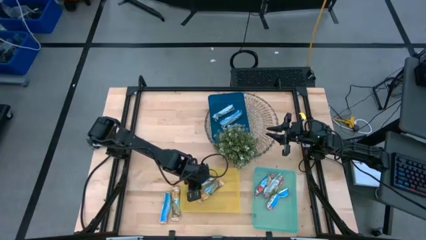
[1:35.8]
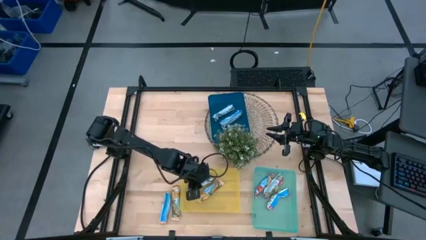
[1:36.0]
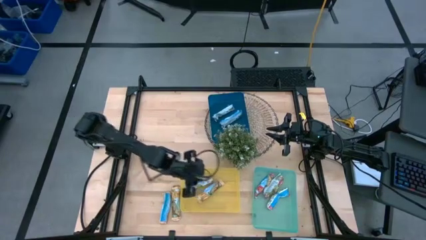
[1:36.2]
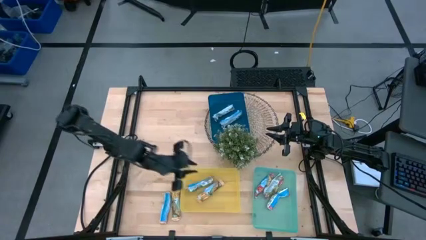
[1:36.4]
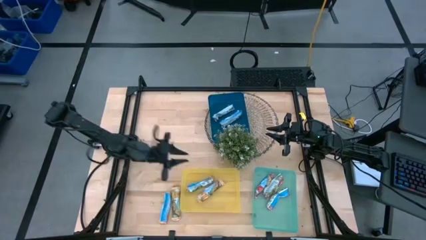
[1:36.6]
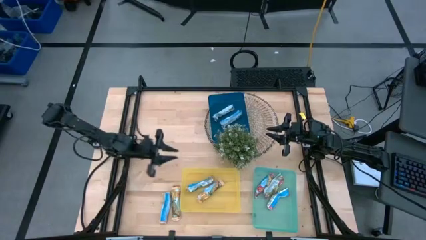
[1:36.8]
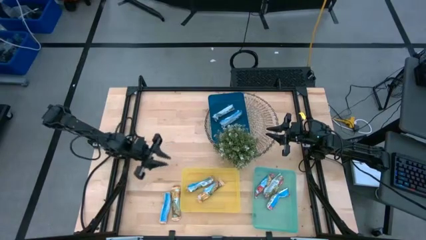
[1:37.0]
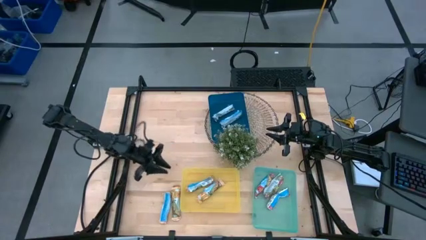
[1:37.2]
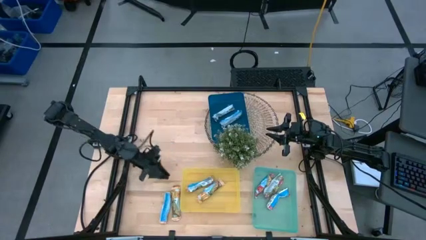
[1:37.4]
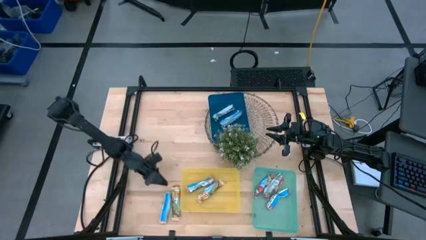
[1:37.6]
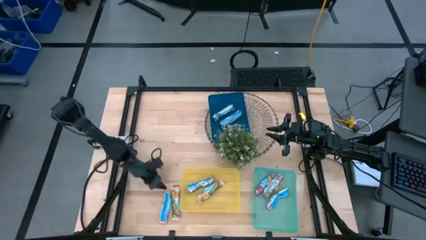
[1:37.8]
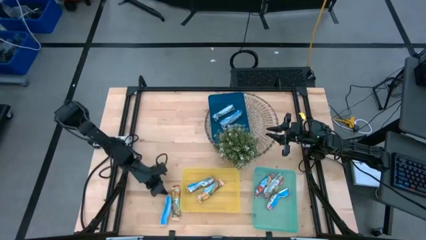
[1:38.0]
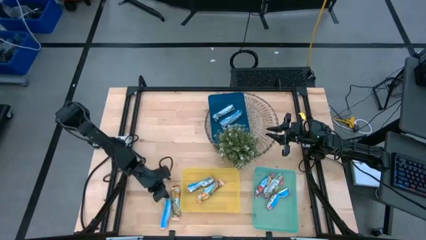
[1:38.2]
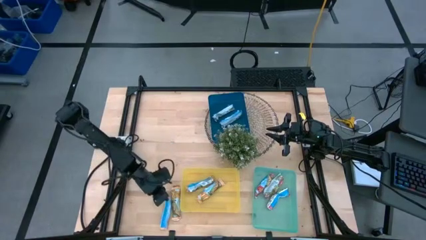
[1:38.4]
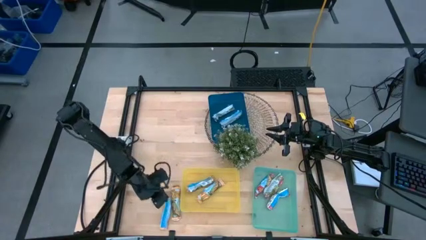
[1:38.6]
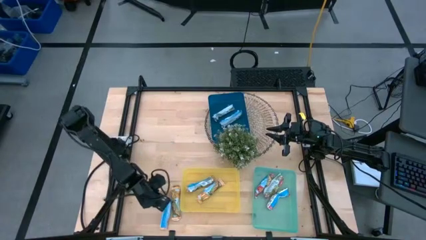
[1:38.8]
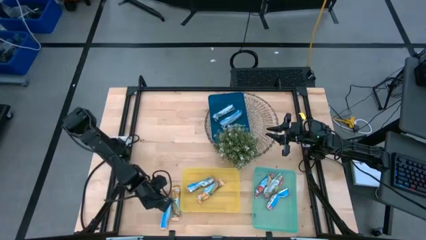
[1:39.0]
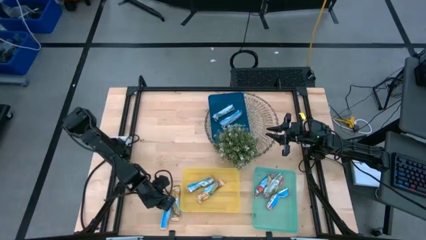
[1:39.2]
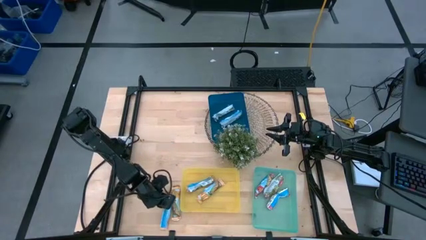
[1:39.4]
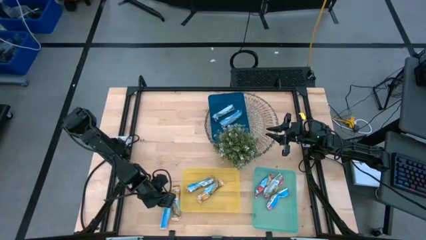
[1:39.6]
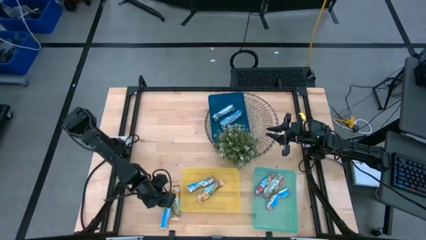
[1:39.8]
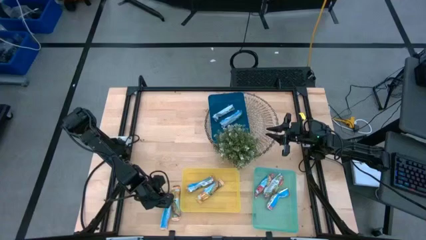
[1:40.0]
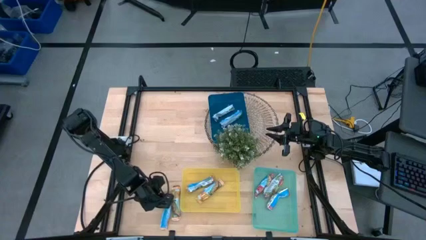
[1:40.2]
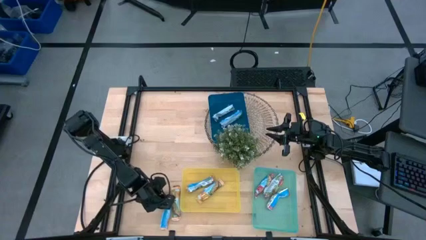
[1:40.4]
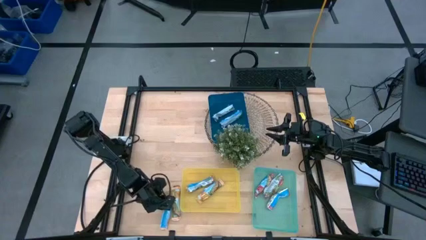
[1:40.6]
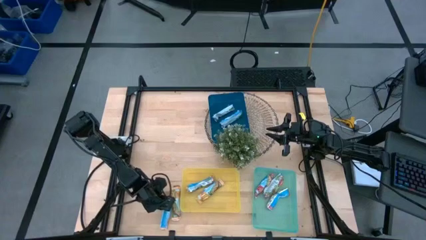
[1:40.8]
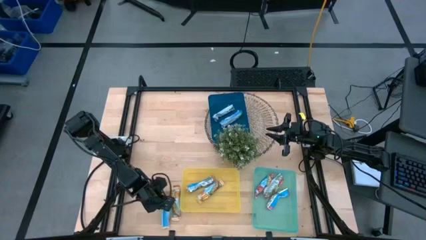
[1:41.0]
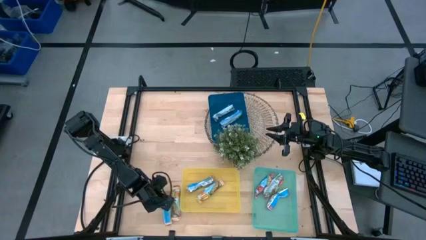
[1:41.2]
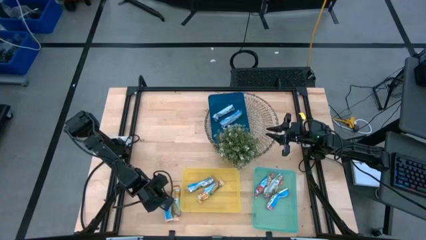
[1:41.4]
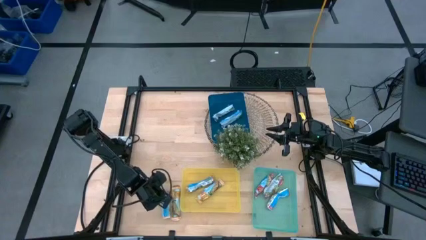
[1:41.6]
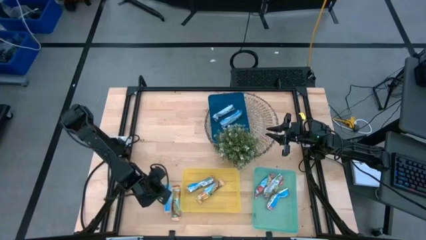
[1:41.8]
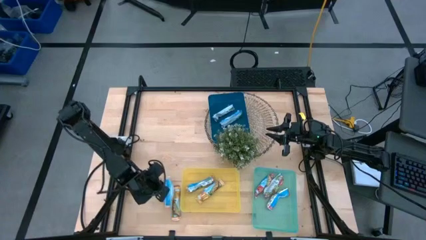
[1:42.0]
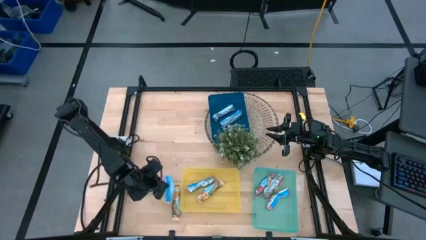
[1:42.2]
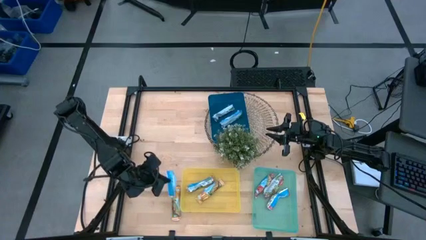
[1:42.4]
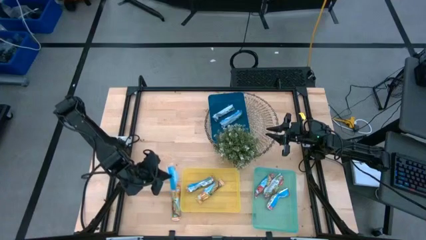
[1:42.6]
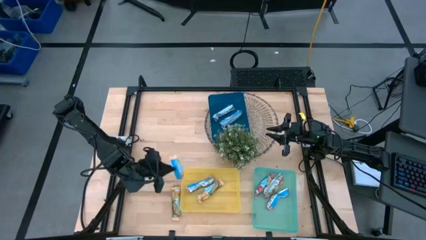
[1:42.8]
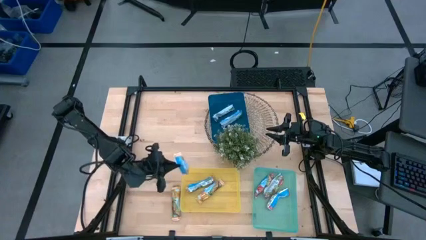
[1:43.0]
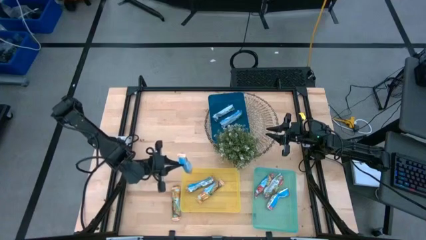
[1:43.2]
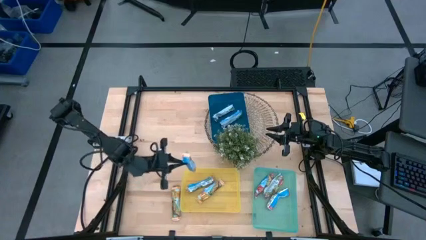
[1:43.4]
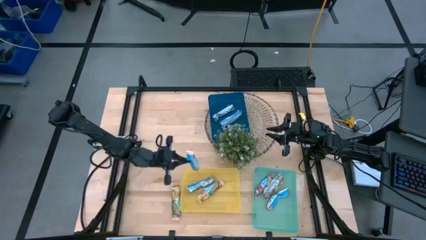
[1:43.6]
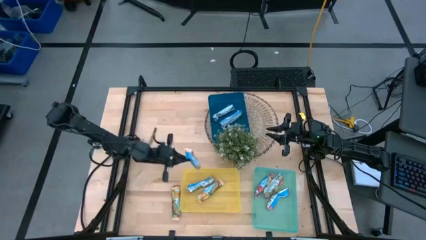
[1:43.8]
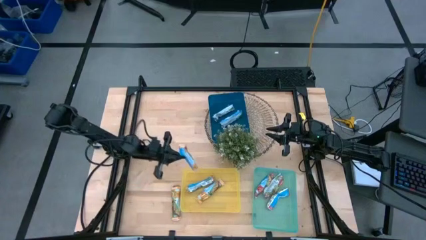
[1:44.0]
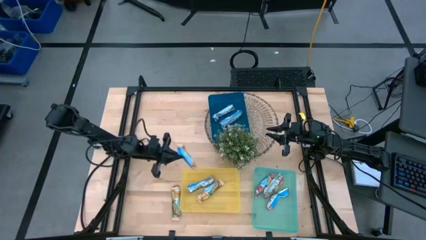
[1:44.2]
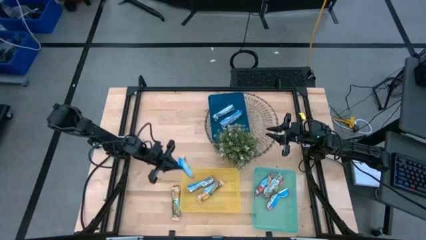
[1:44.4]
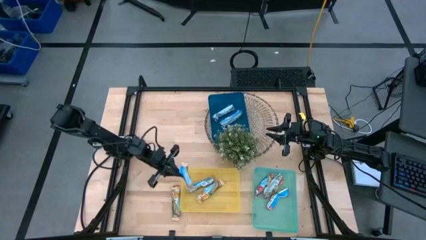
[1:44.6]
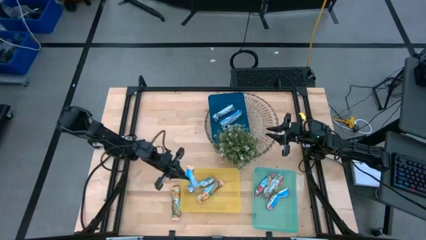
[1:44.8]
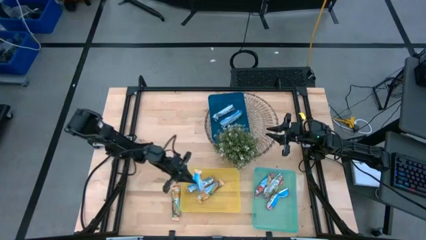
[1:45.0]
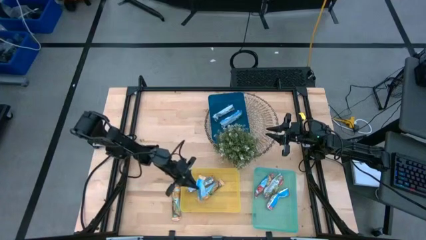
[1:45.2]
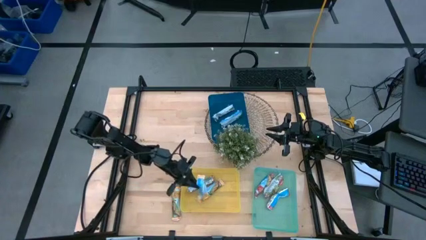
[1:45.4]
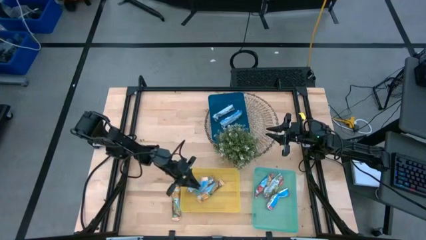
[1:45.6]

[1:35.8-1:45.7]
Task: Pick and place Granola Bars by type
Put the yellow granola bar into the yellow bin

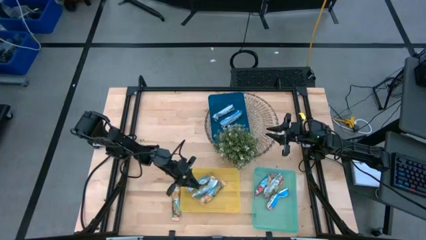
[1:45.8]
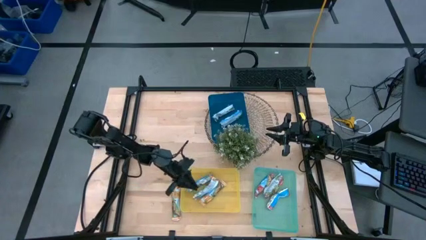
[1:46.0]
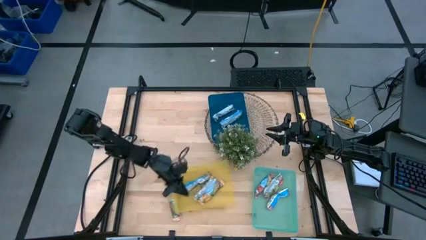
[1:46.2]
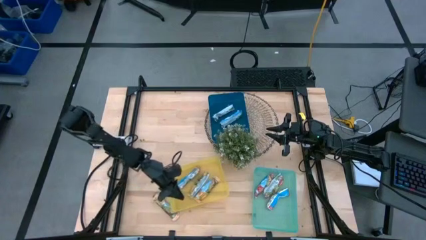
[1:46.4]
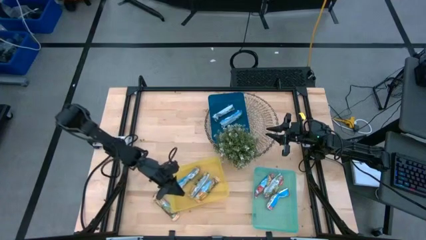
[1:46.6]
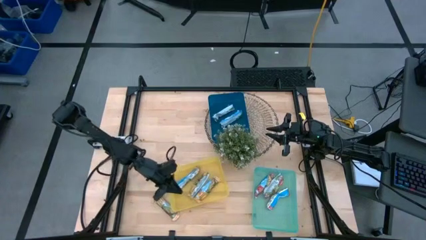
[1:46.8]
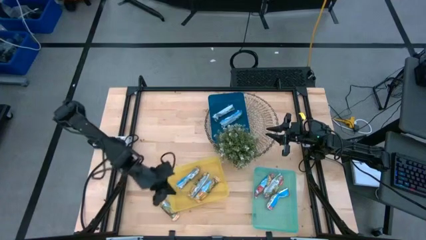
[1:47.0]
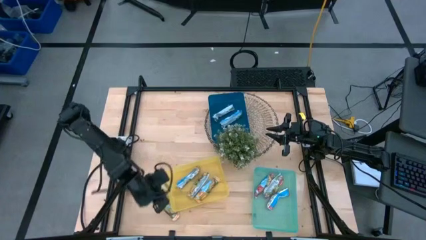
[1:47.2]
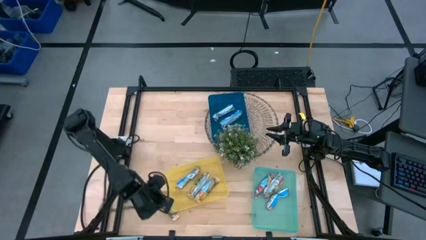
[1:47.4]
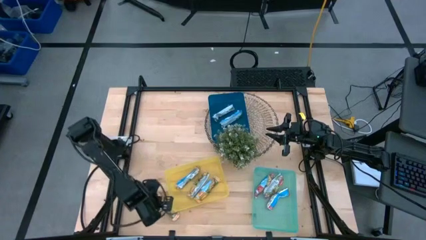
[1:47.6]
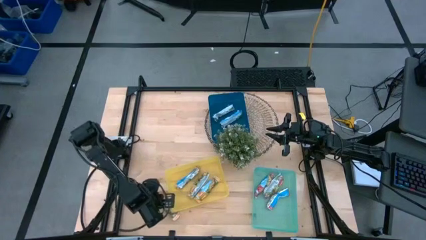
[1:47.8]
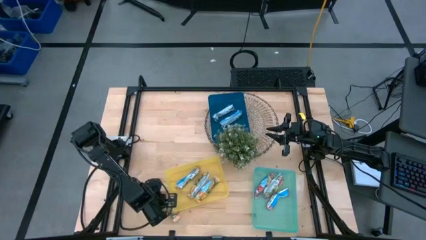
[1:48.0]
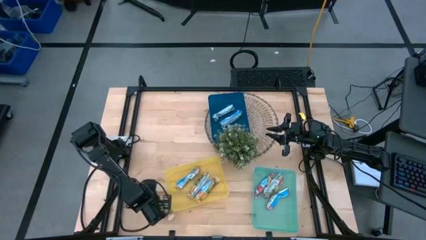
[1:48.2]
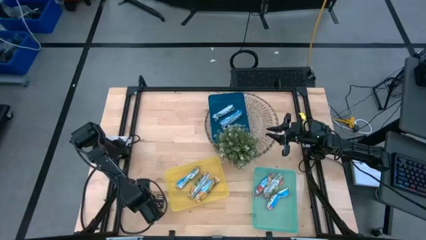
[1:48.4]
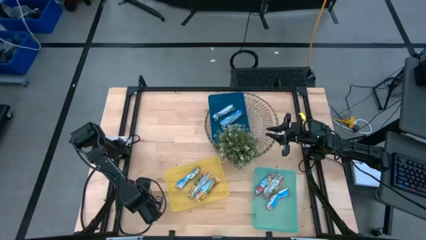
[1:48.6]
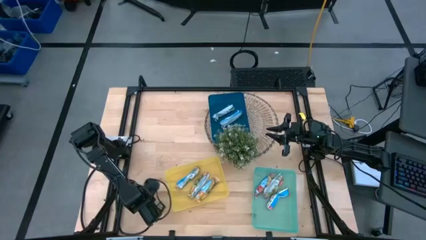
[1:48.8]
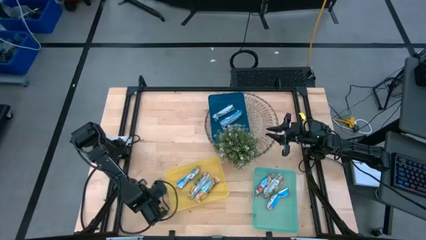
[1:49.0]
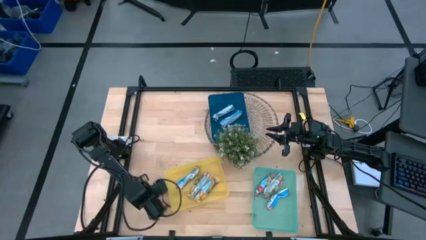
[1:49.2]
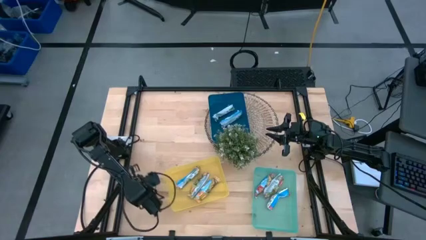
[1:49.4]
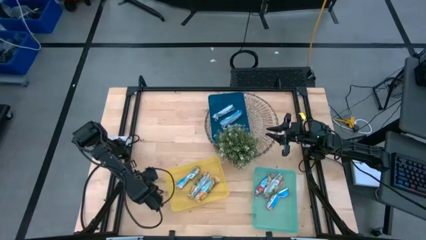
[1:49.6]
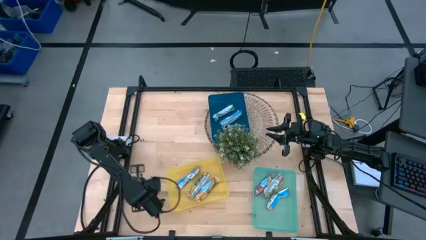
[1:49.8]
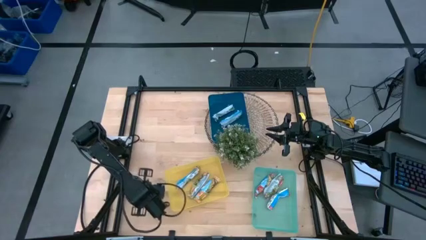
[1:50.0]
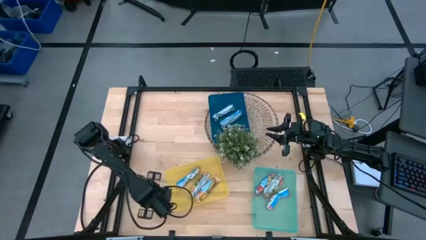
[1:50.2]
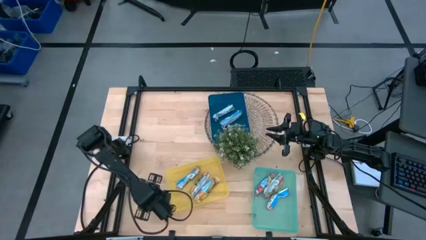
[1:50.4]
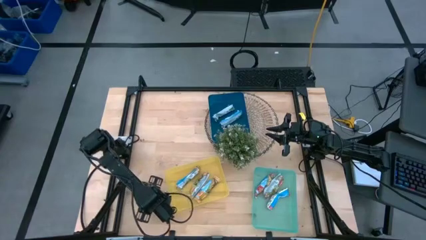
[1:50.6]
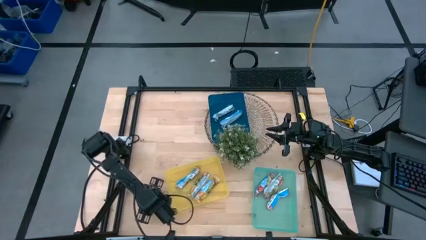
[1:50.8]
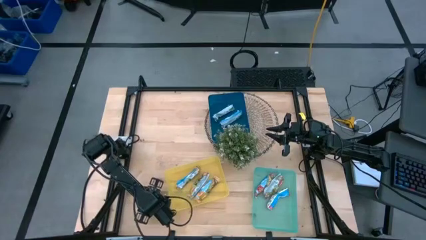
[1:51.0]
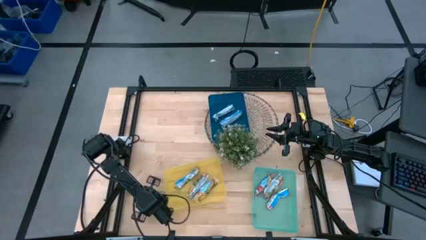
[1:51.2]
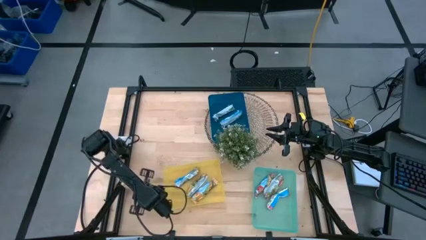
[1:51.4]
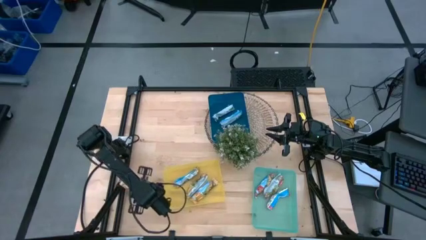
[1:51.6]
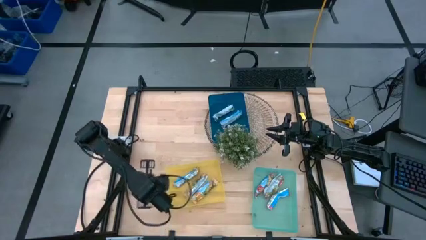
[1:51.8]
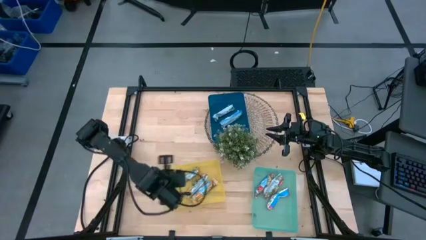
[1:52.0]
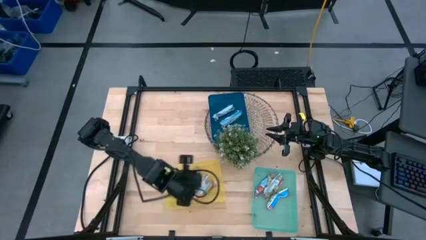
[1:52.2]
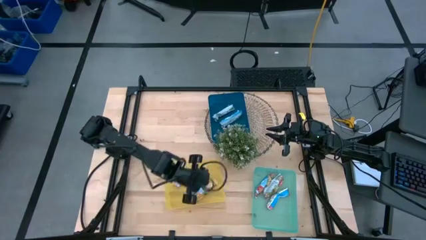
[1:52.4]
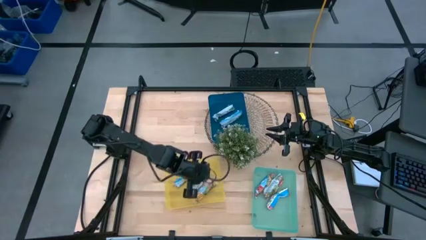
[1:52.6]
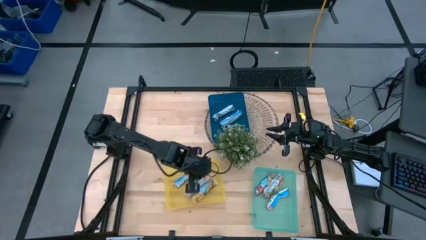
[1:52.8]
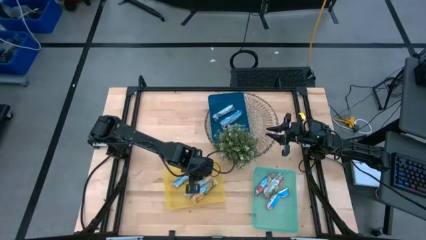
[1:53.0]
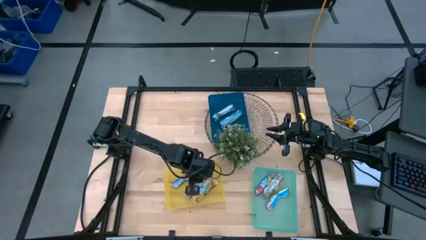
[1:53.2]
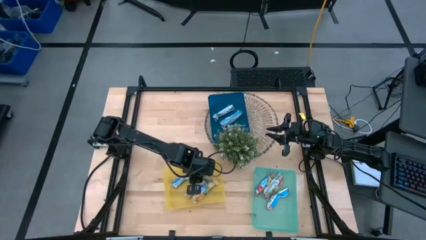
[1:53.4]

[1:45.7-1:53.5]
Put the yellow granola bar into the yellow bin
